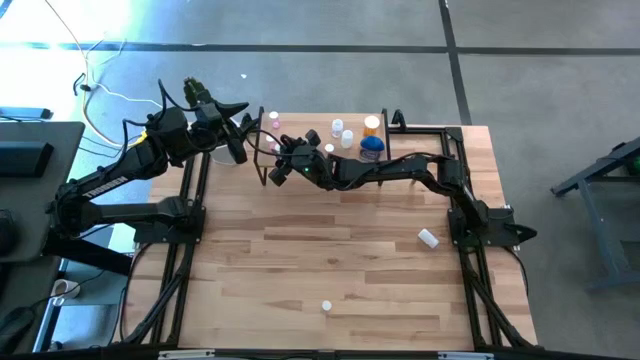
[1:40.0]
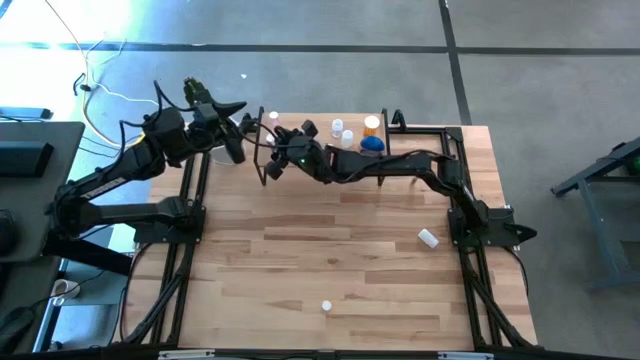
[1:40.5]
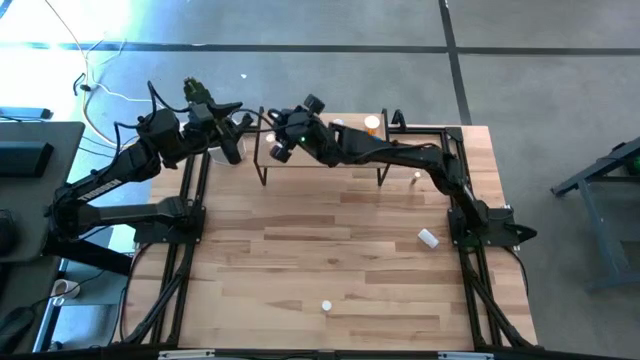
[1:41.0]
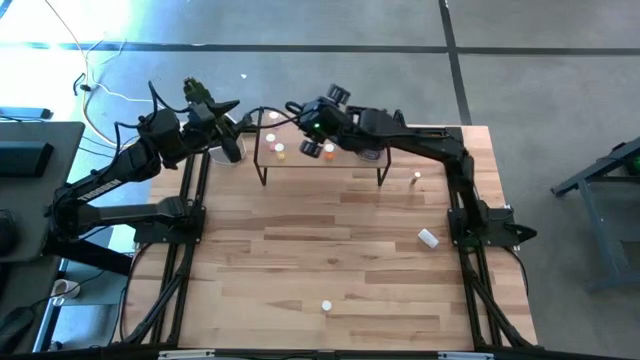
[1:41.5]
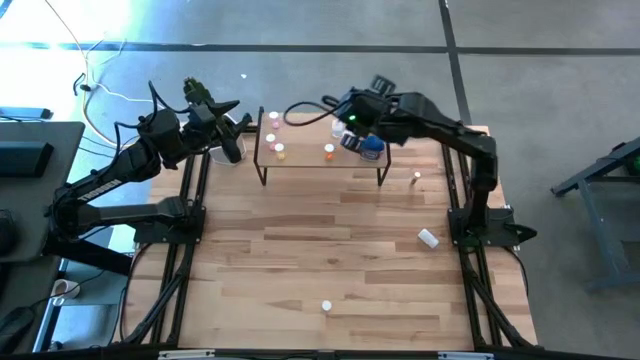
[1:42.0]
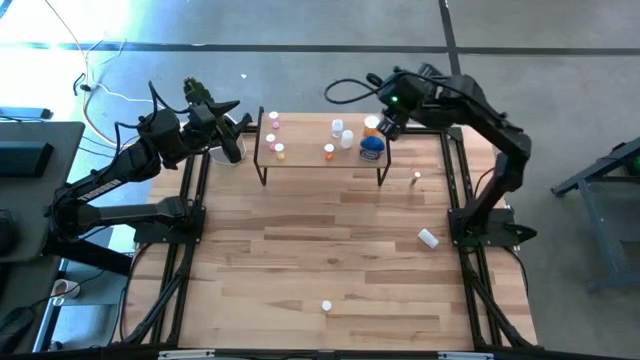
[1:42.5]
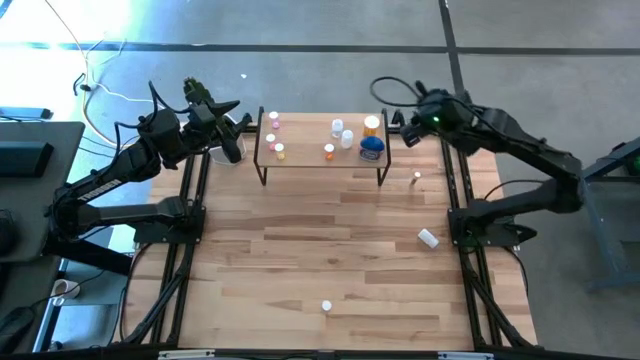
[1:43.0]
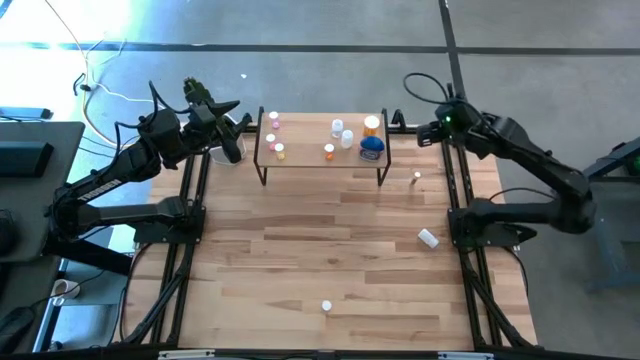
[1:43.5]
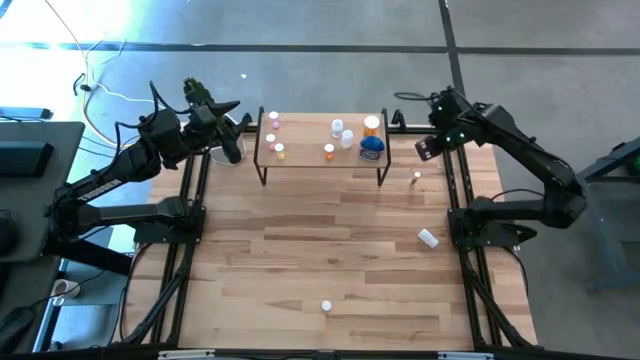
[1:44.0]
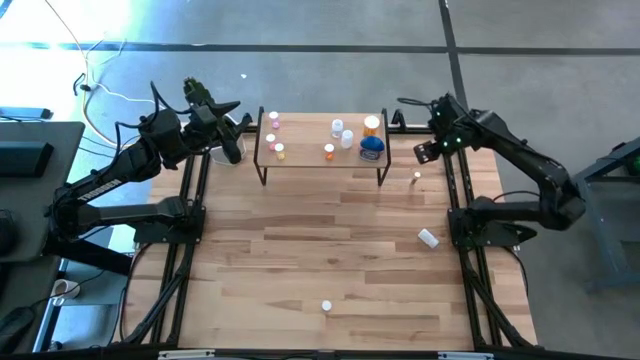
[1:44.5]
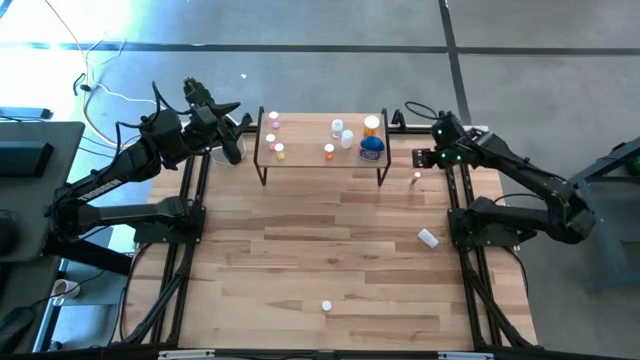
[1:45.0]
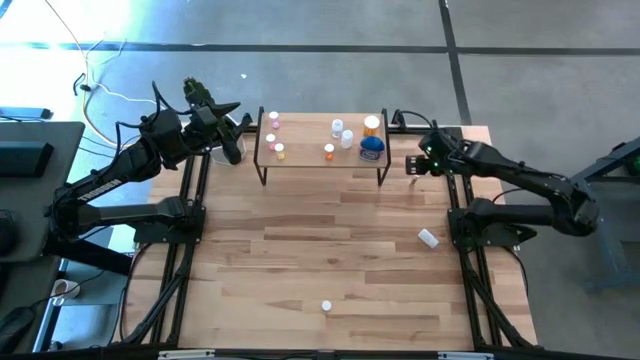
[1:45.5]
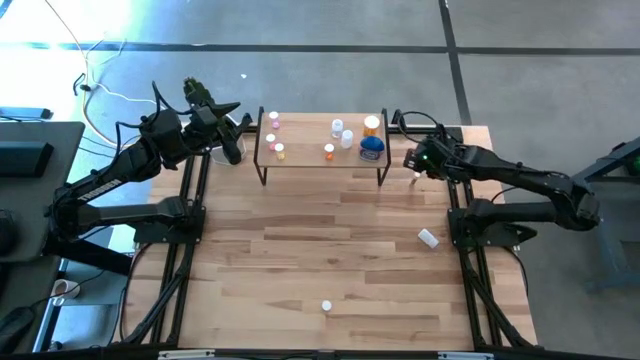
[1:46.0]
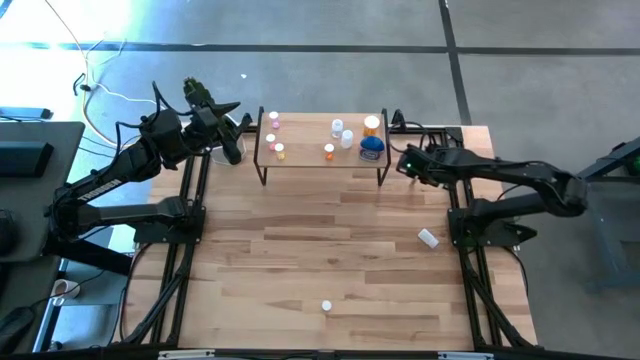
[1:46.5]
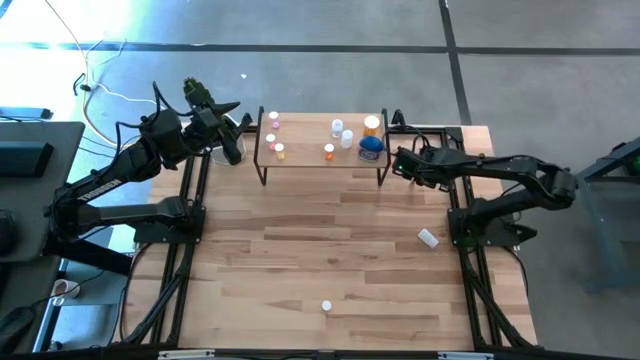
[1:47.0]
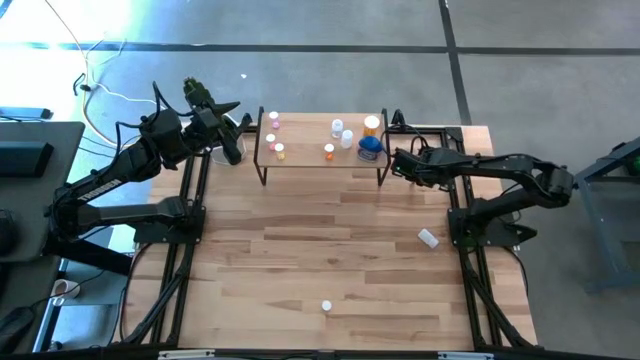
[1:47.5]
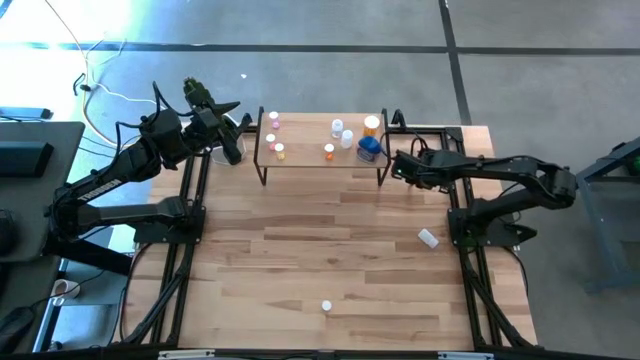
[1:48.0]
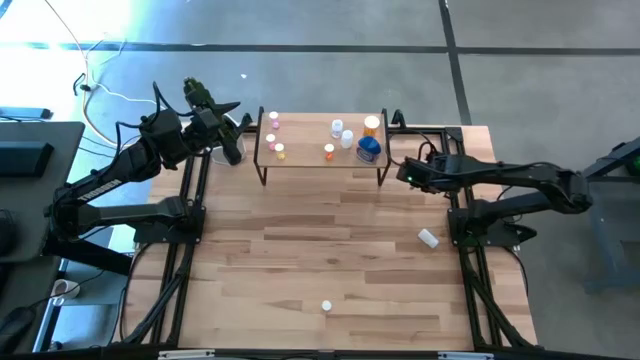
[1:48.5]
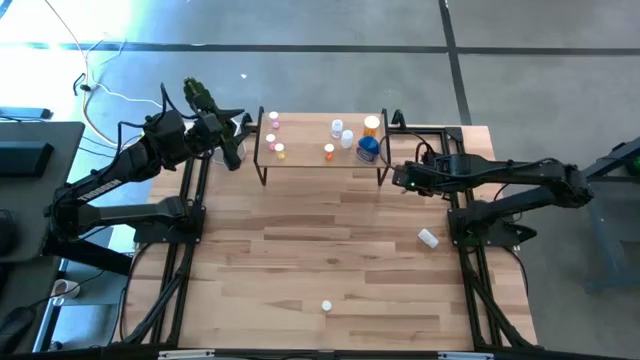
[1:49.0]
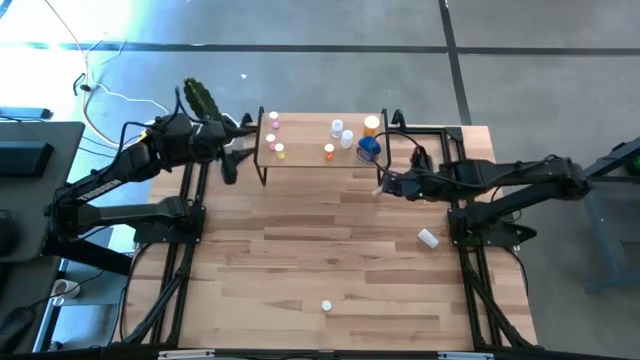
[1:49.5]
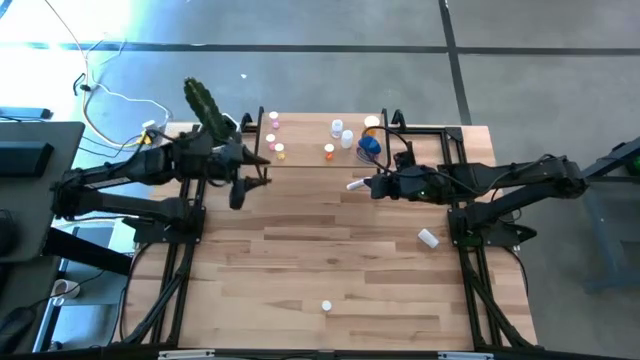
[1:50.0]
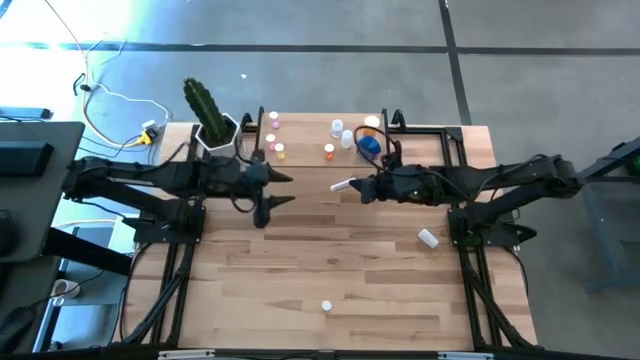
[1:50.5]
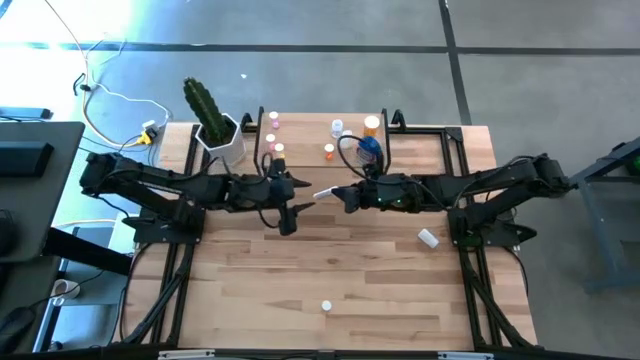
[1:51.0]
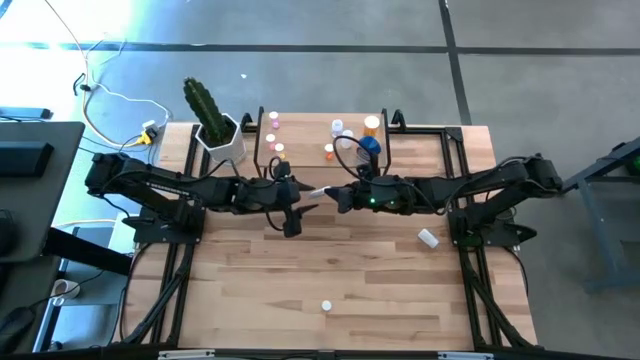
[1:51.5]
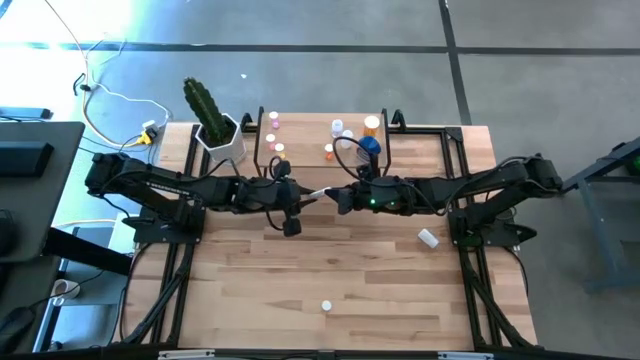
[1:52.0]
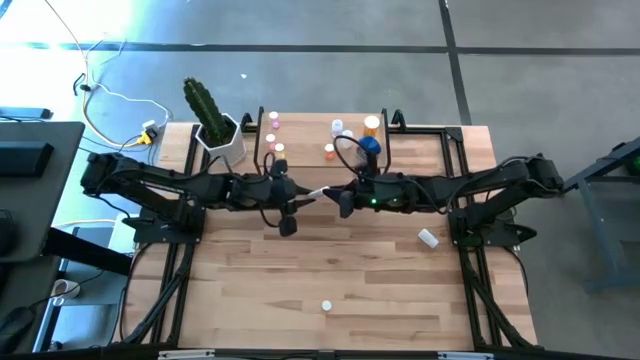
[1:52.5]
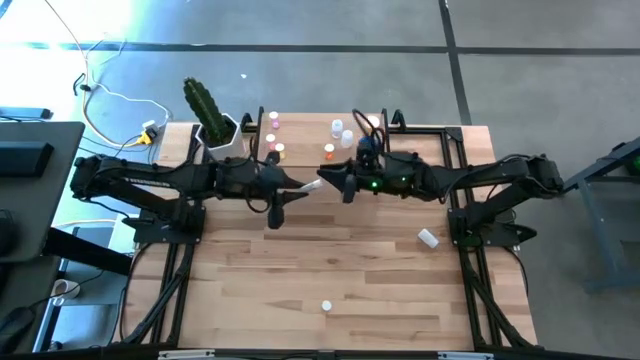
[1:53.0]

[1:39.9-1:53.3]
Task: Pick and place medicine bottles onto shelf by color
Put the top white pill bottle on the shelf

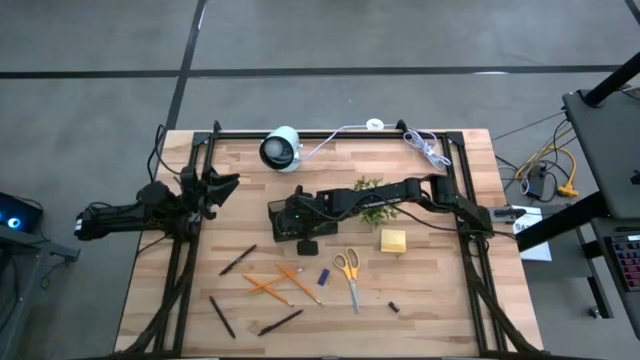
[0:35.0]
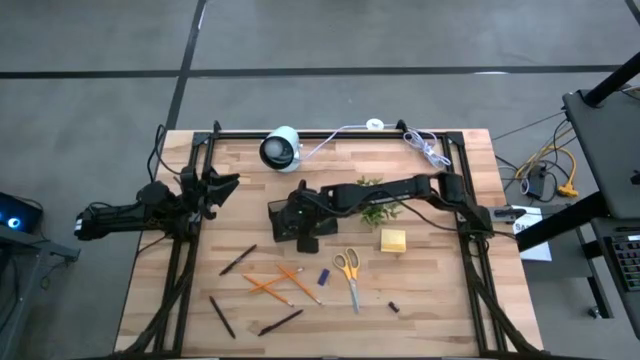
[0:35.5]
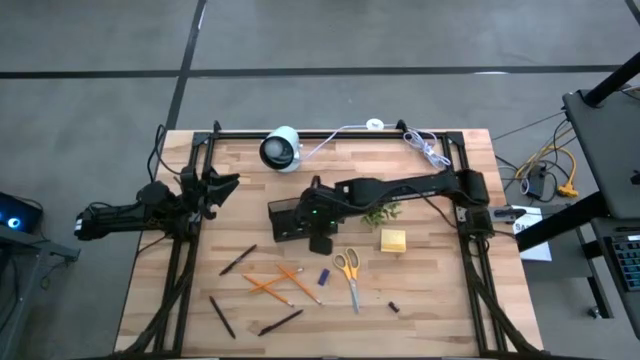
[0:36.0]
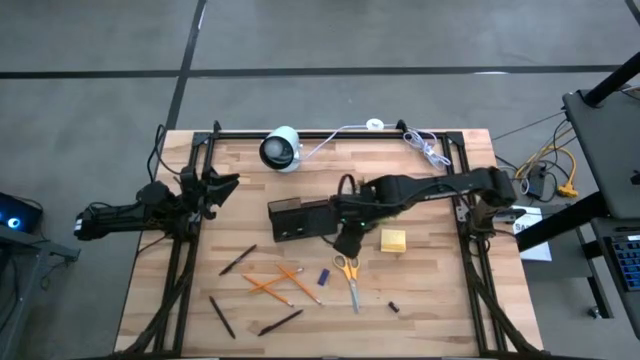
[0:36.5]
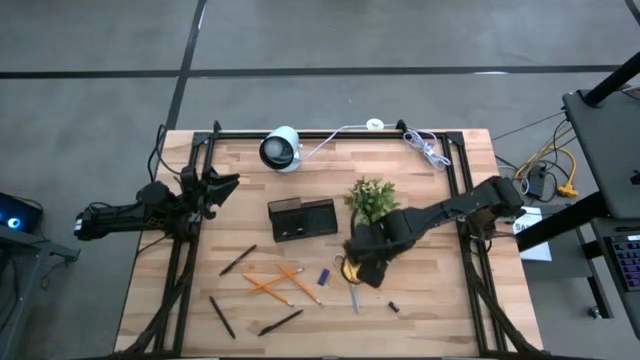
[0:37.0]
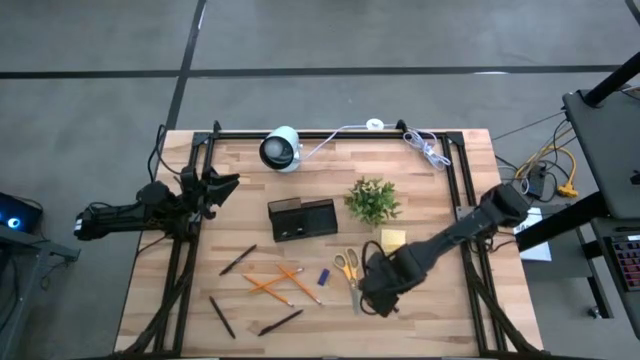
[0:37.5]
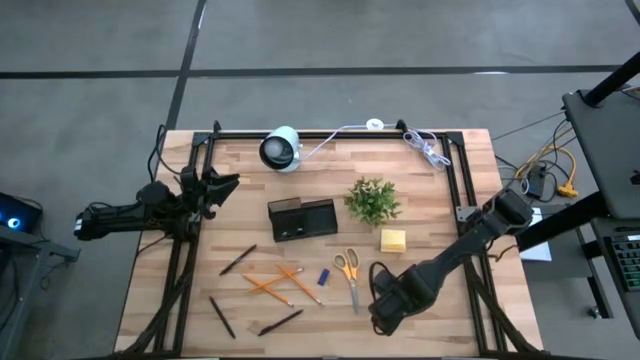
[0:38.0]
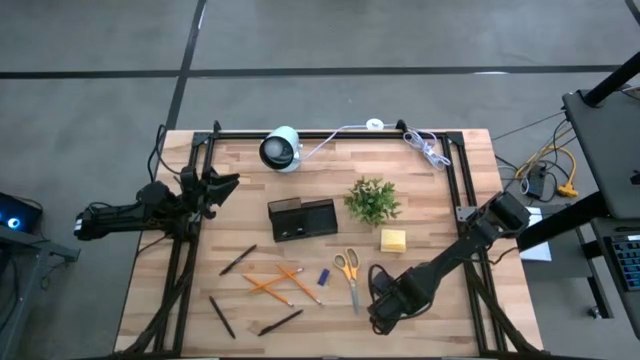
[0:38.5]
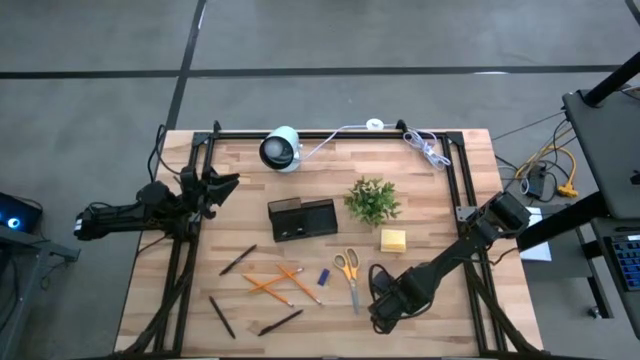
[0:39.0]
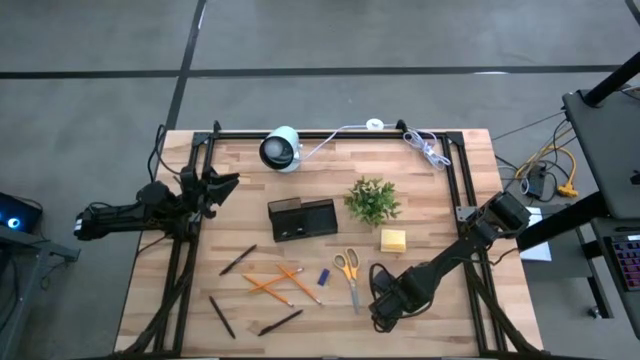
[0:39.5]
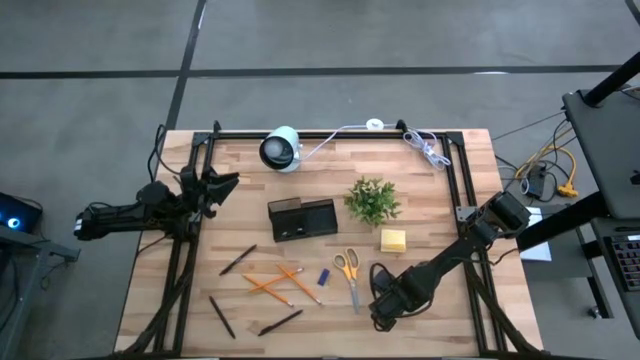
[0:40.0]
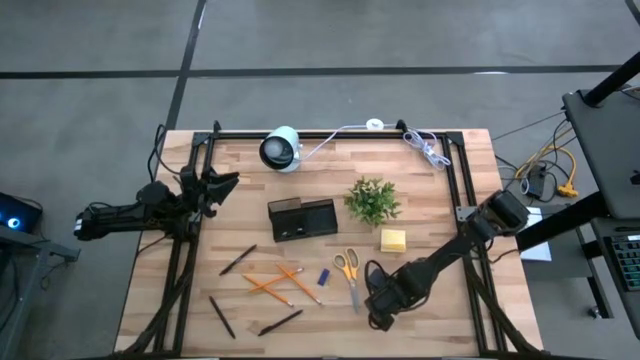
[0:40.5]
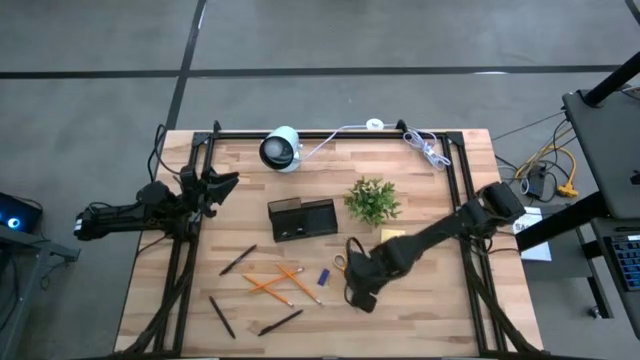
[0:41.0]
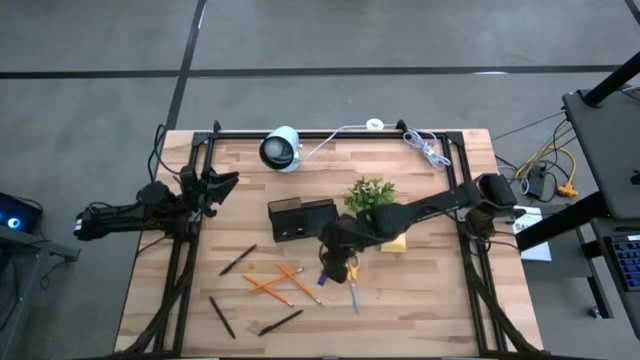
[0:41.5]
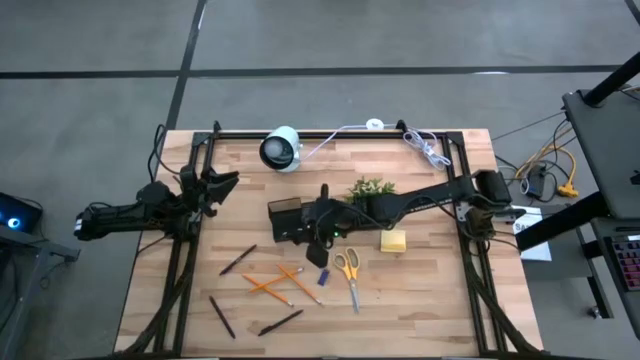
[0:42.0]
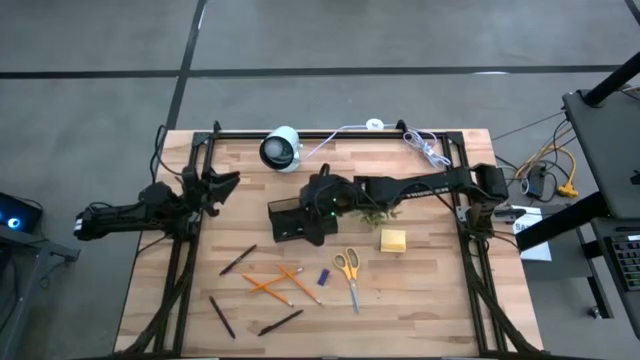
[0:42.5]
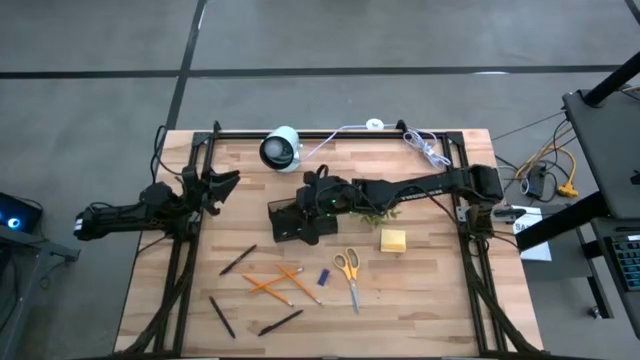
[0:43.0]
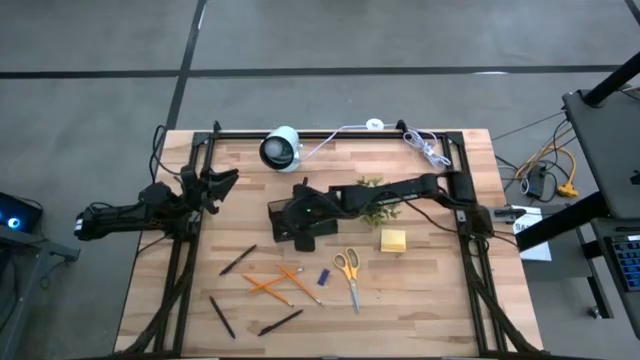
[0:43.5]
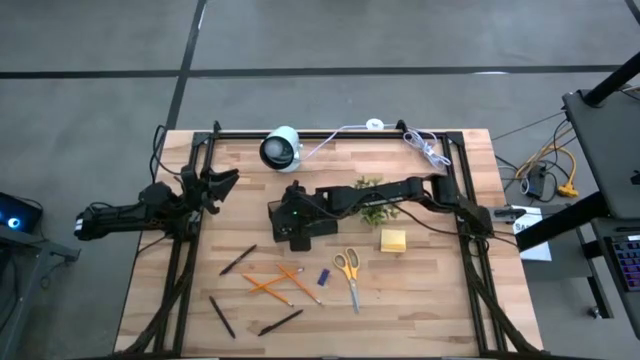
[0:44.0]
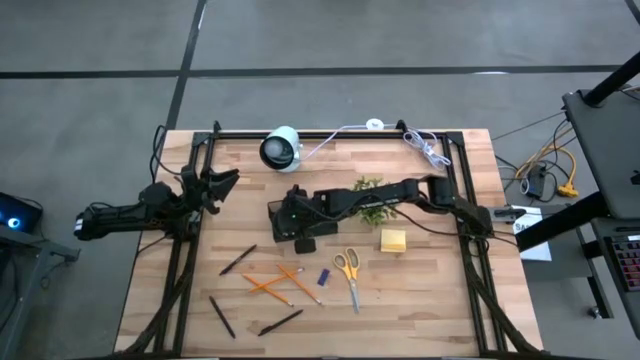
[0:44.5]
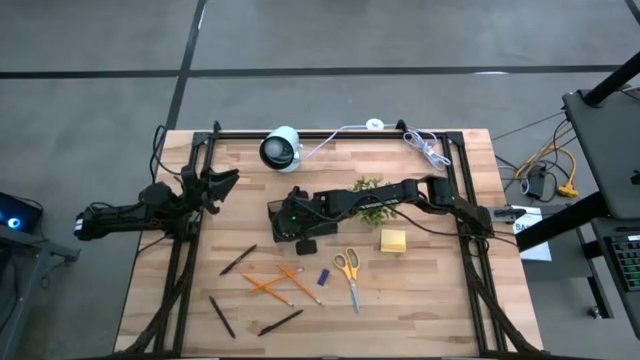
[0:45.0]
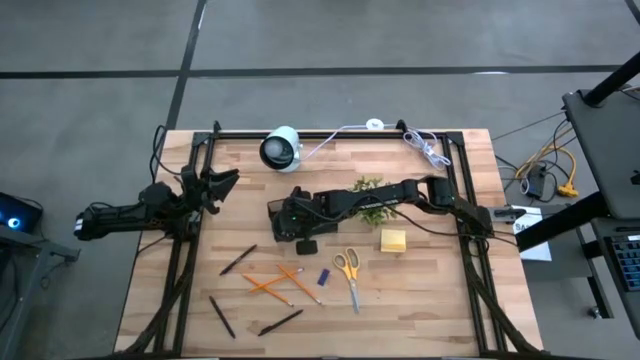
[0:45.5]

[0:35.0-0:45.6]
Task: Pick and place office supplies into organizer
Put the binder clip in the black desk organizer
